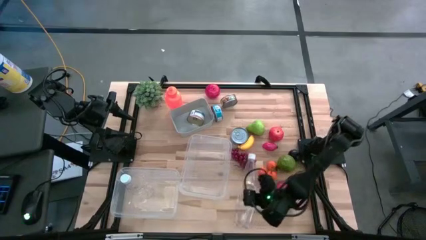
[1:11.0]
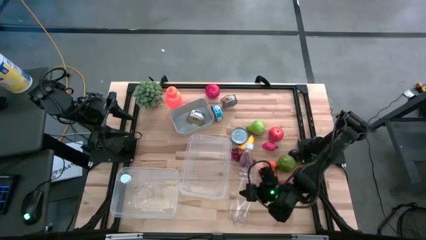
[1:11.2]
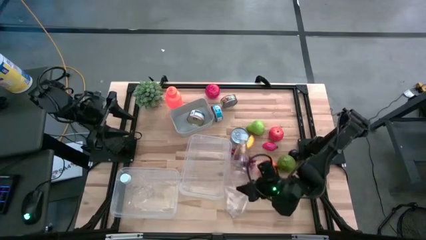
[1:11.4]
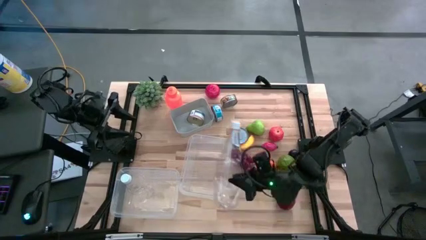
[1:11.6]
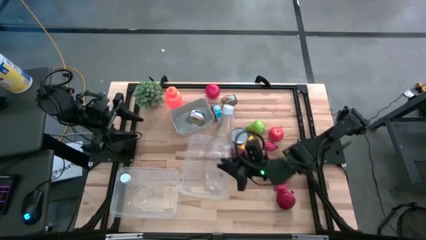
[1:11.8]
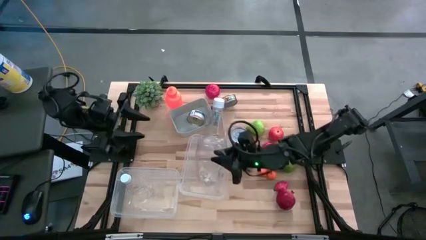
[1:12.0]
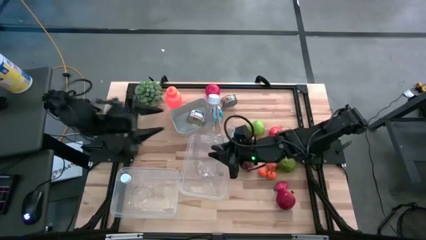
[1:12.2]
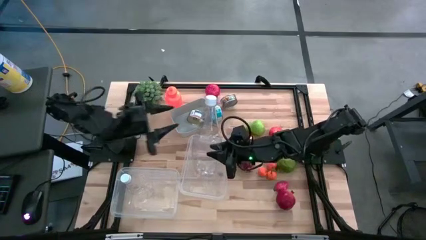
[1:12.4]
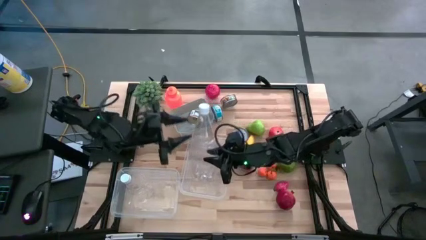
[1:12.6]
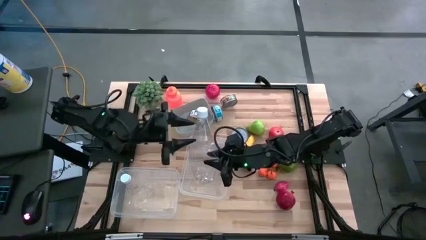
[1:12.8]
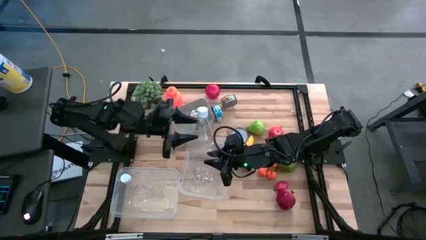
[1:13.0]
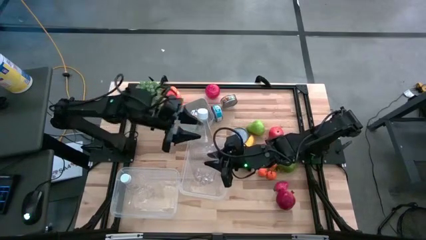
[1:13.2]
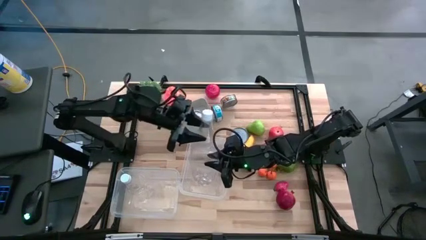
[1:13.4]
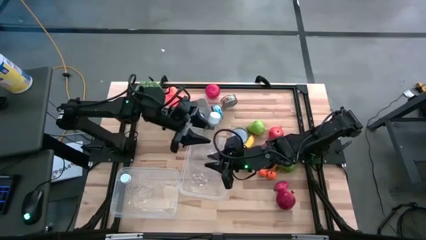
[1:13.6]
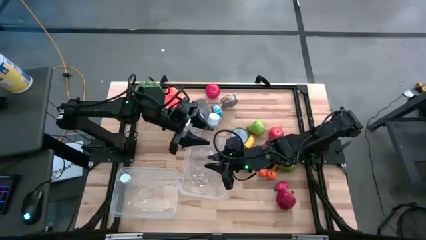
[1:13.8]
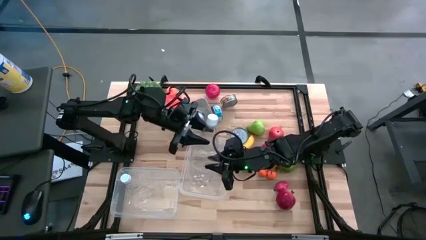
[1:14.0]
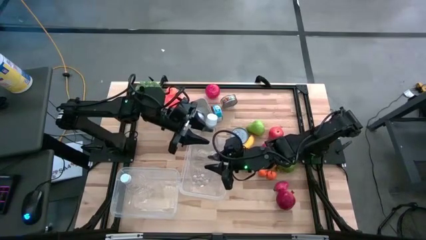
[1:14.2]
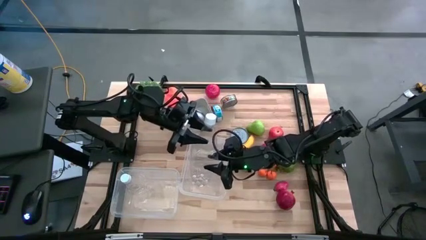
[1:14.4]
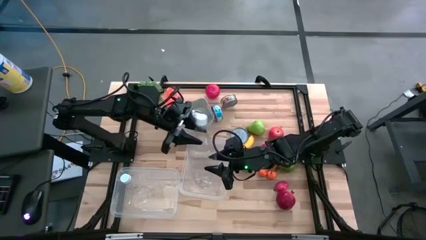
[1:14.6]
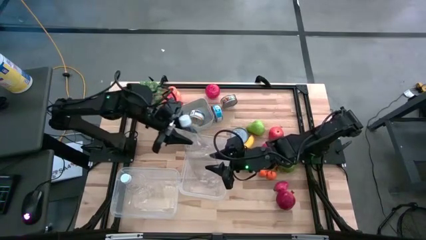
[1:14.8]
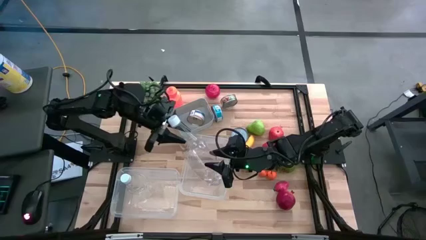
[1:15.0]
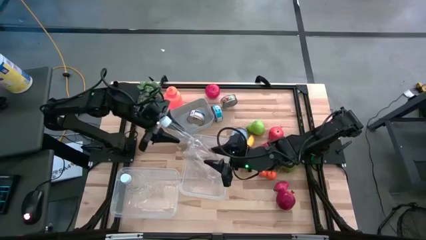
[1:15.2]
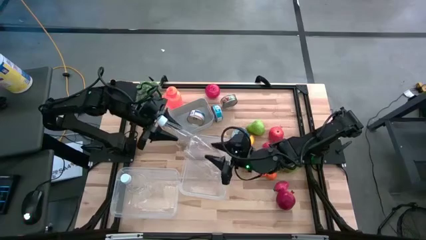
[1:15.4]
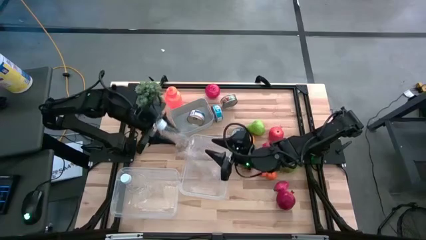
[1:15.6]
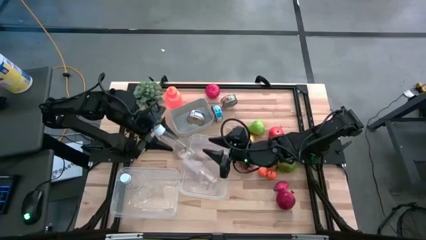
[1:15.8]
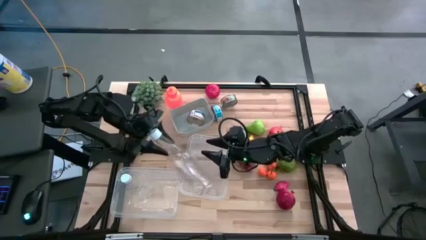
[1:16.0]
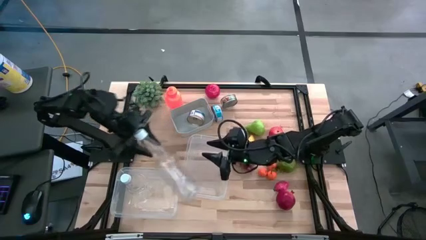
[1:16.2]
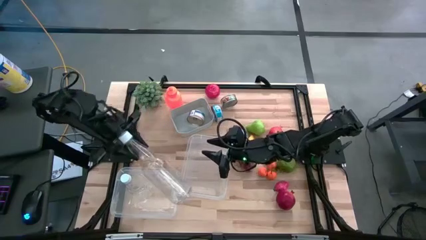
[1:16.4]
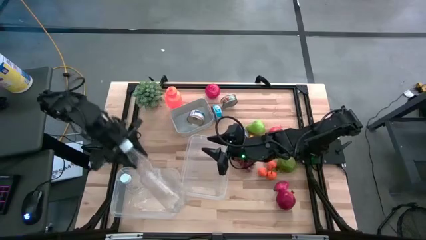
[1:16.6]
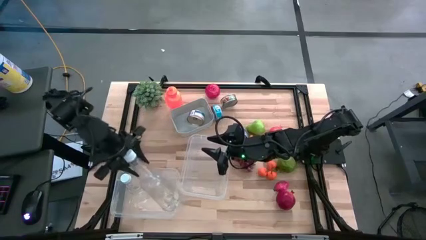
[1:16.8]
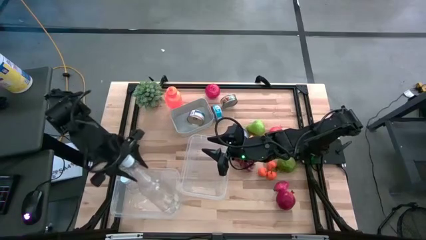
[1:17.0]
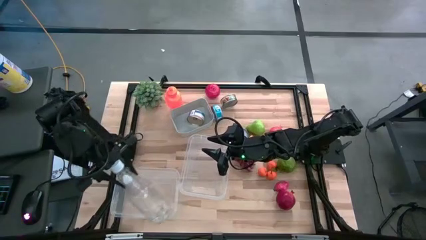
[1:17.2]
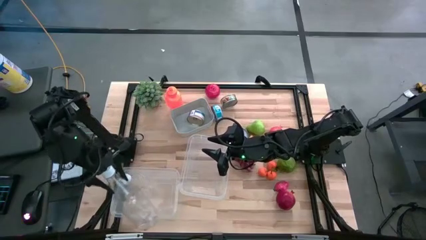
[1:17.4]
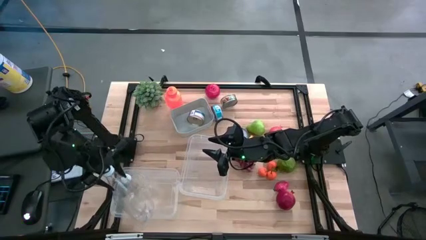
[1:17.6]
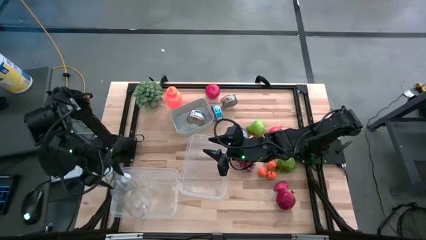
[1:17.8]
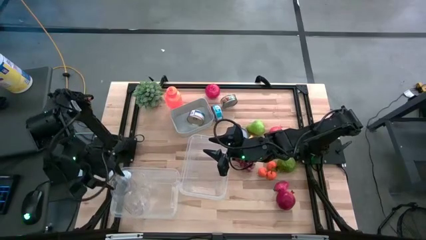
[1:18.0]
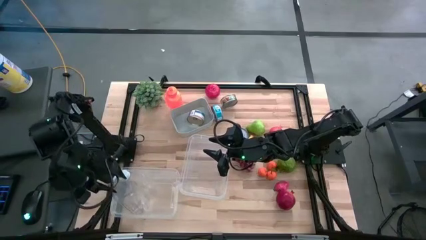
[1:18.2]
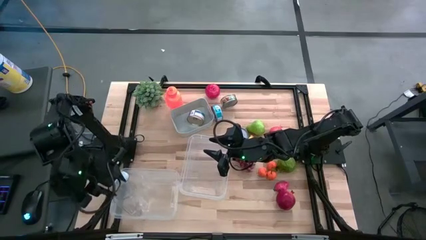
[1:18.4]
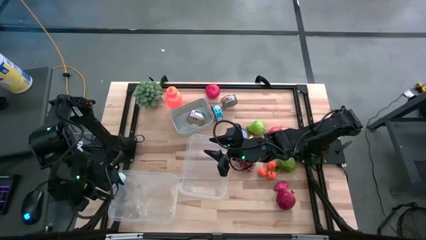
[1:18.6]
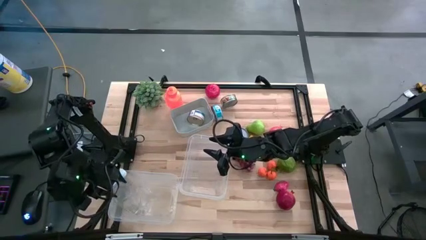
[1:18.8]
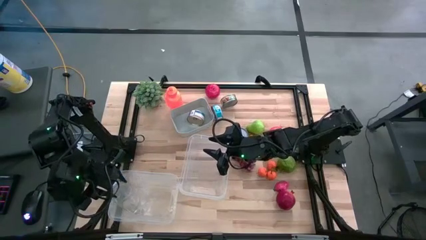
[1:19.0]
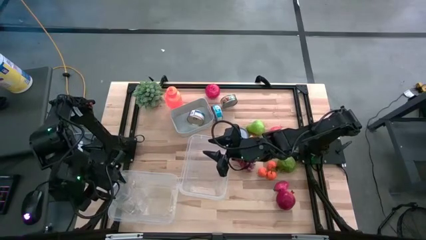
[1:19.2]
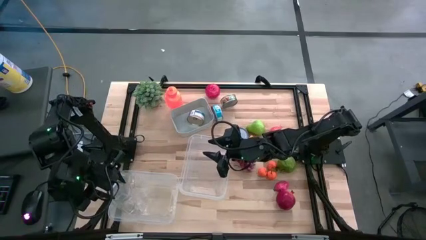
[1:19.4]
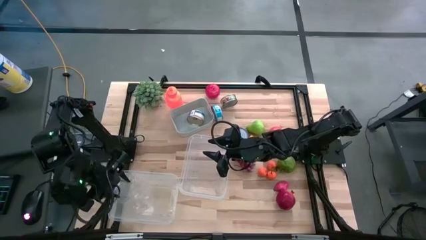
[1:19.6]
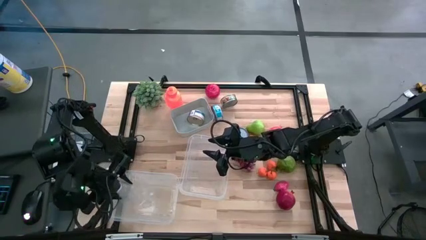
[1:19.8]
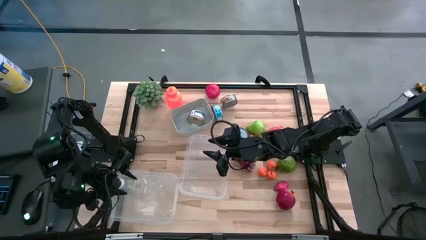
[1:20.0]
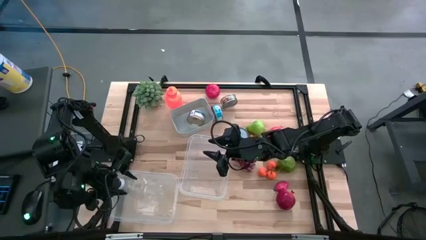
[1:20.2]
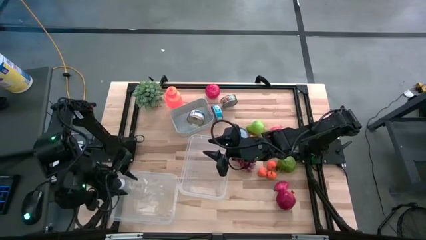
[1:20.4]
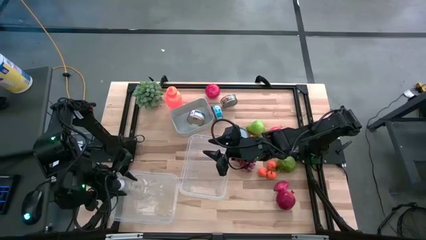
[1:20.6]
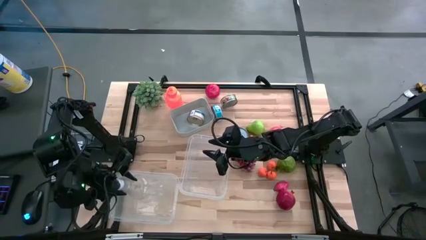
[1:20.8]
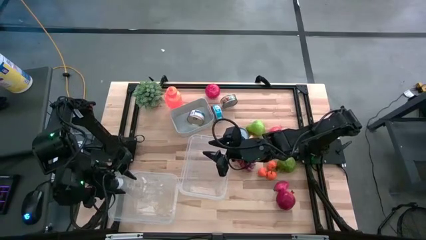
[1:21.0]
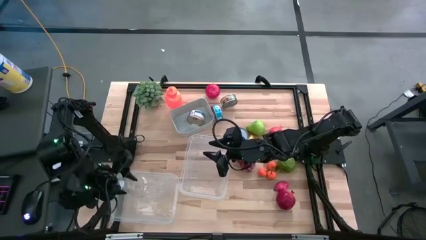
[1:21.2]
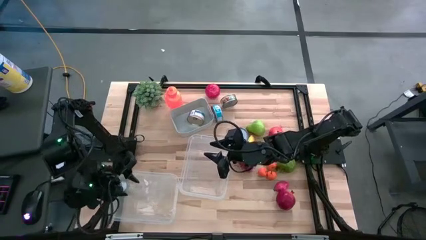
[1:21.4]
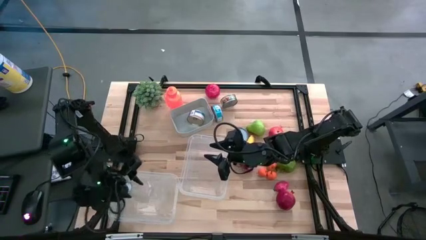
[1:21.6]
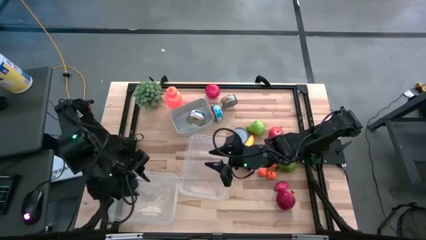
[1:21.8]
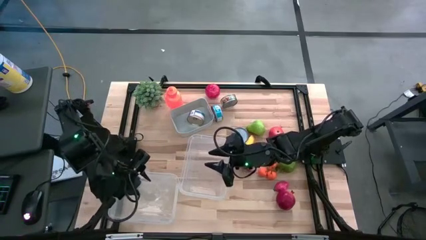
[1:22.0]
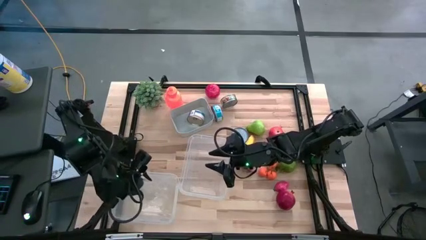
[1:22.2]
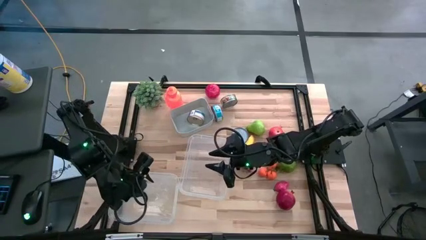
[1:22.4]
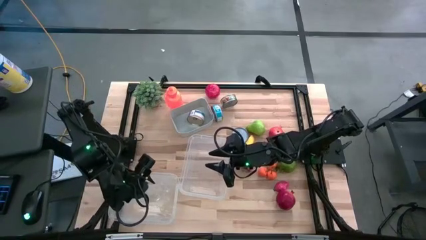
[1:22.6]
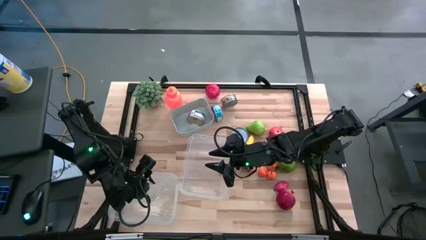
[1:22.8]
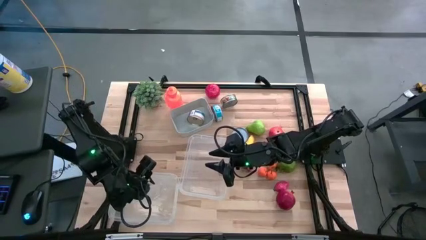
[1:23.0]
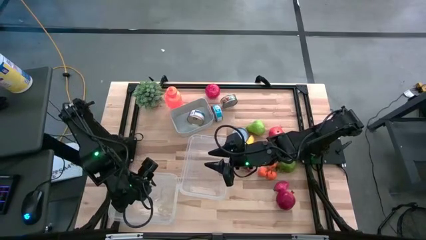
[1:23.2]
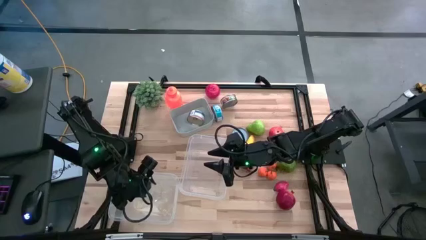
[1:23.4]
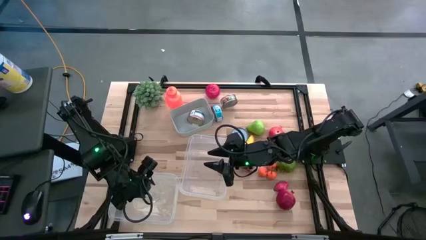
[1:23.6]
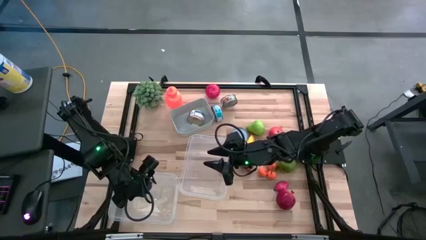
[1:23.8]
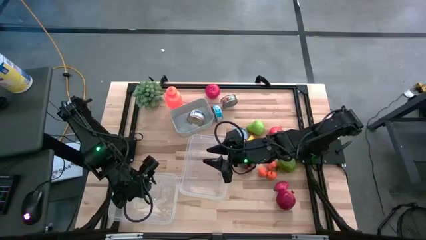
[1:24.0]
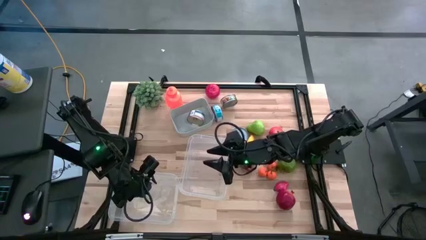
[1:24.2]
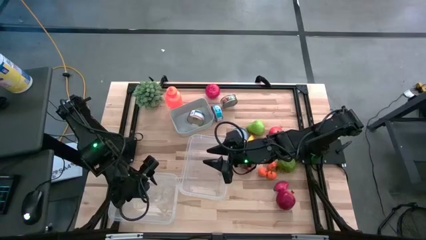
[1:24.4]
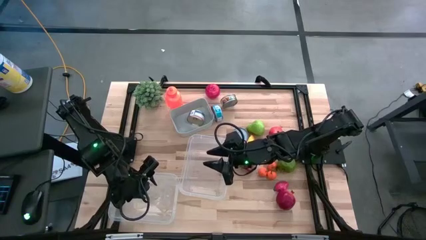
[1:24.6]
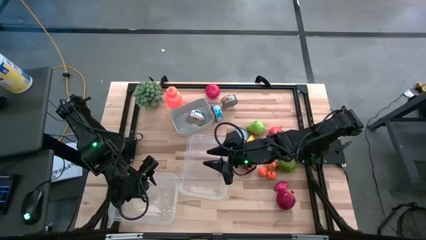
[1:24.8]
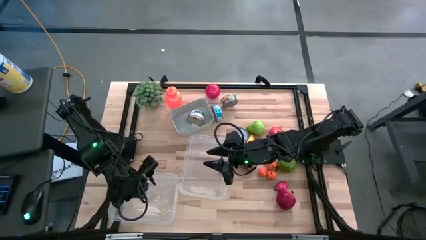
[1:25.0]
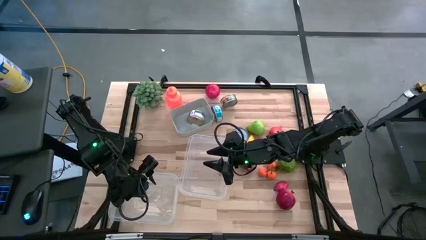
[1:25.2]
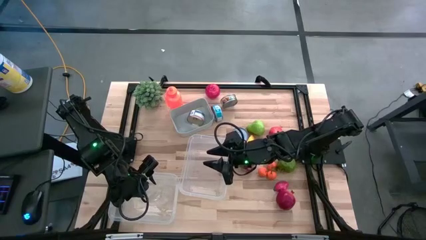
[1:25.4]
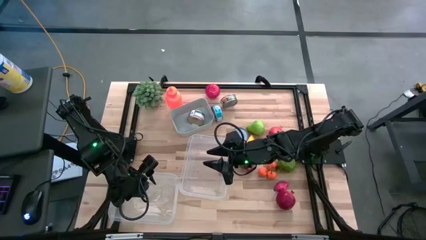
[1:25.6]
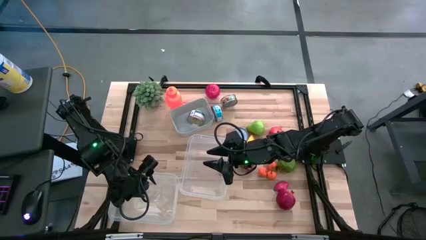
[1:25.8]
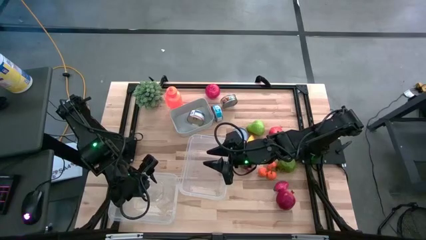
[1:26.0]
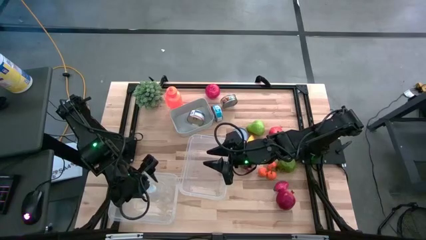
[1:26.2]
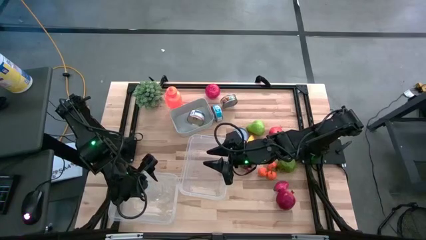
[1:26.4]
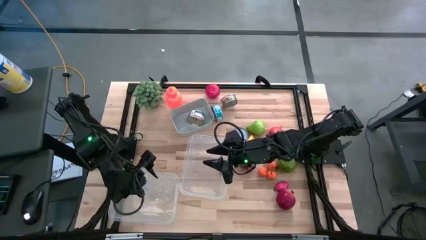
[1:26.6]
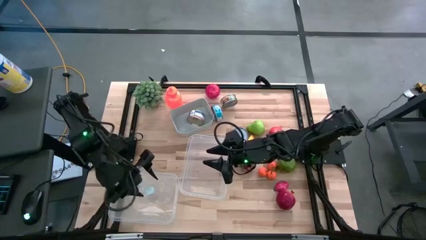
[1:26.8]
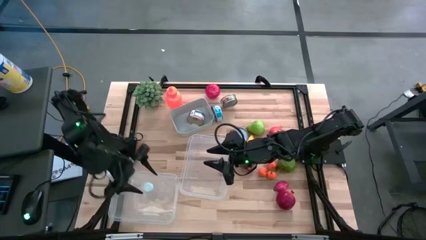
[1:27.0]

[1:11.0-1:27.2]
Task: Pick & Place Food Item
Put the transparent plastic bottle into the left transparent bin
